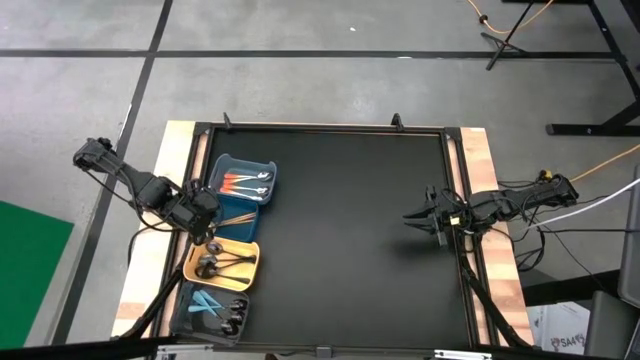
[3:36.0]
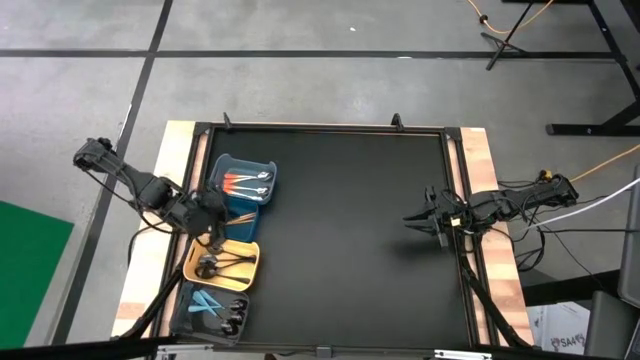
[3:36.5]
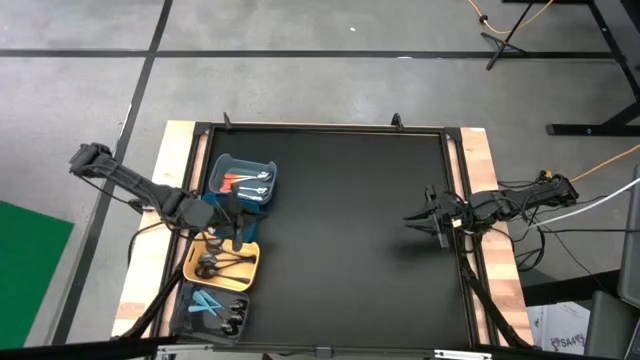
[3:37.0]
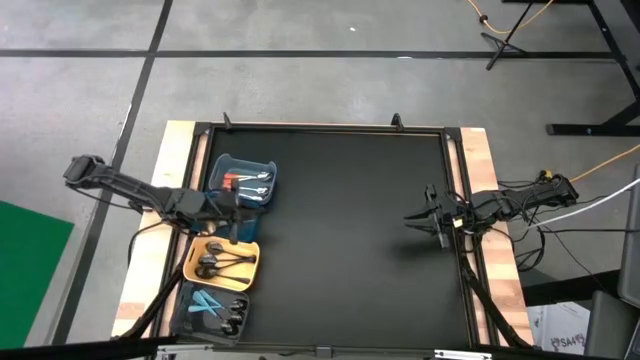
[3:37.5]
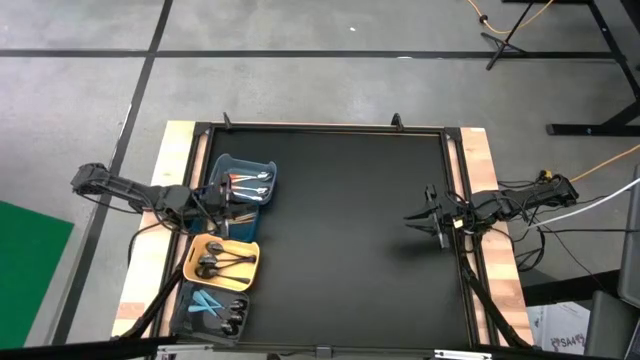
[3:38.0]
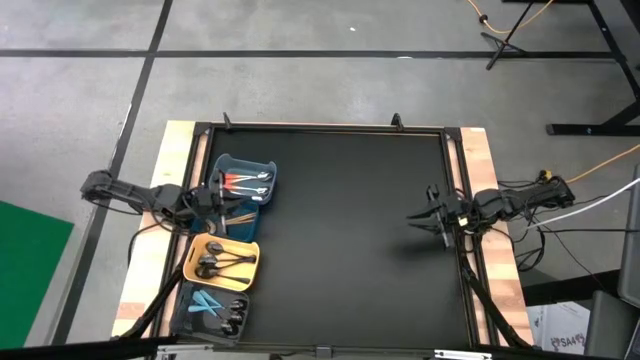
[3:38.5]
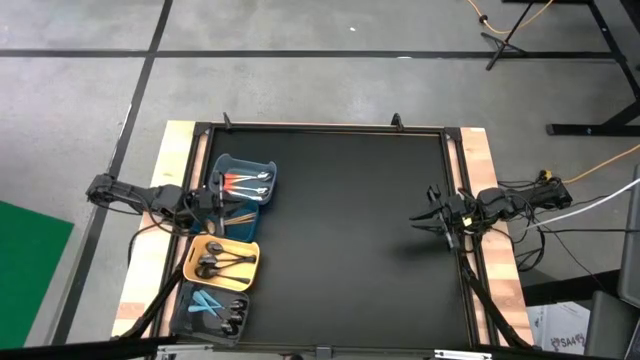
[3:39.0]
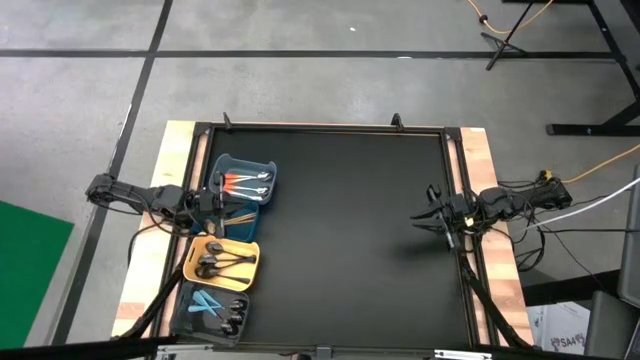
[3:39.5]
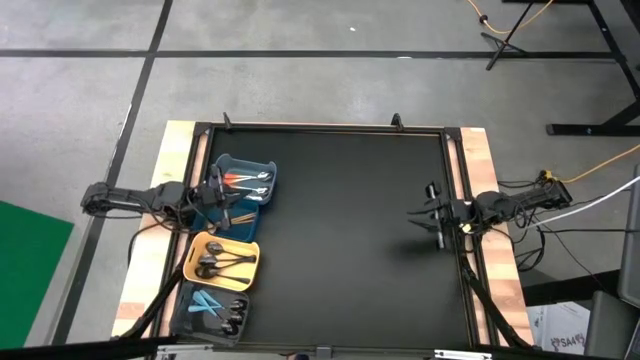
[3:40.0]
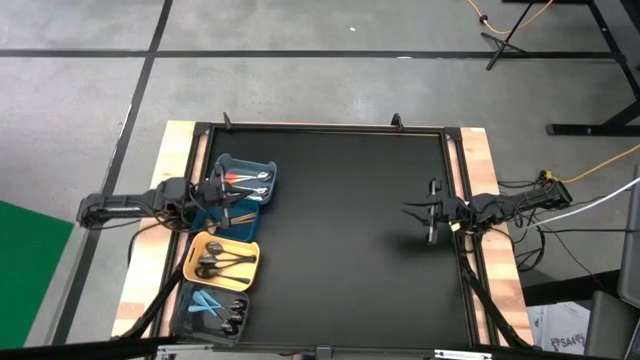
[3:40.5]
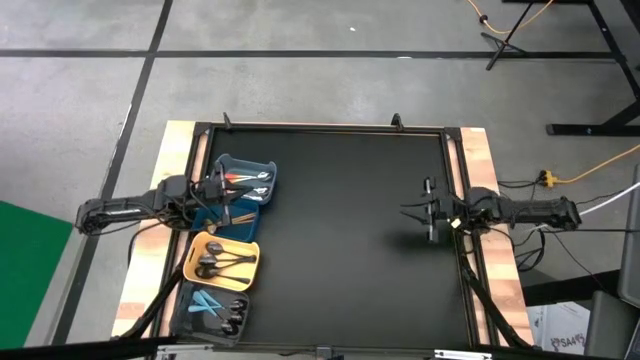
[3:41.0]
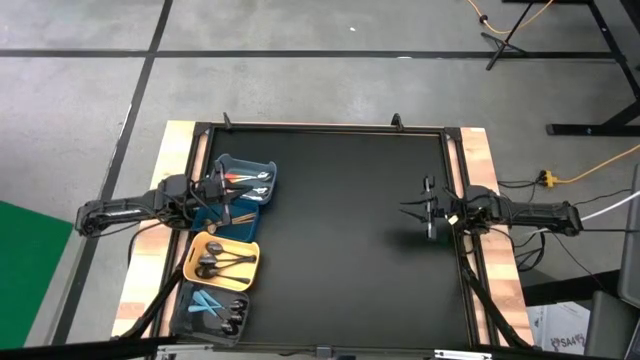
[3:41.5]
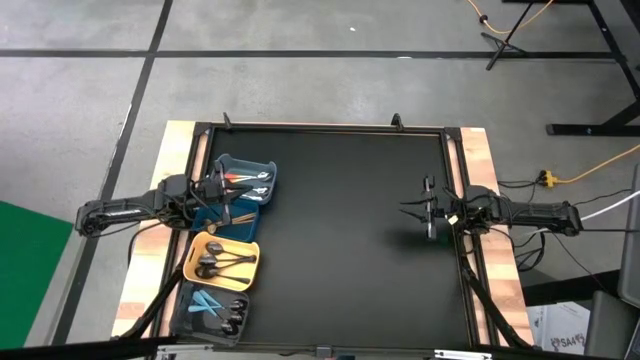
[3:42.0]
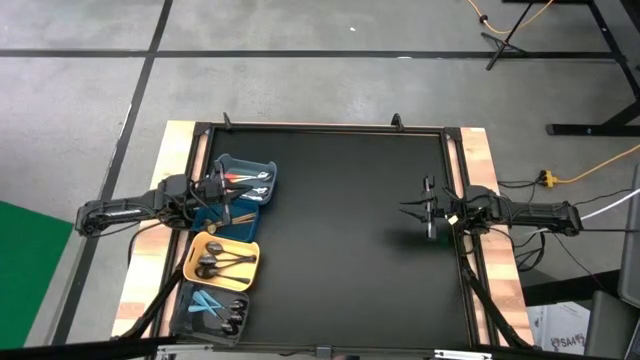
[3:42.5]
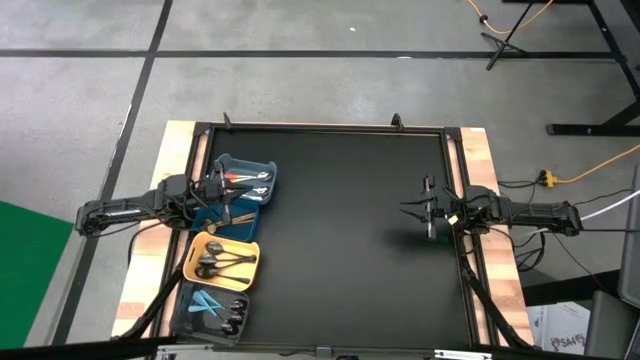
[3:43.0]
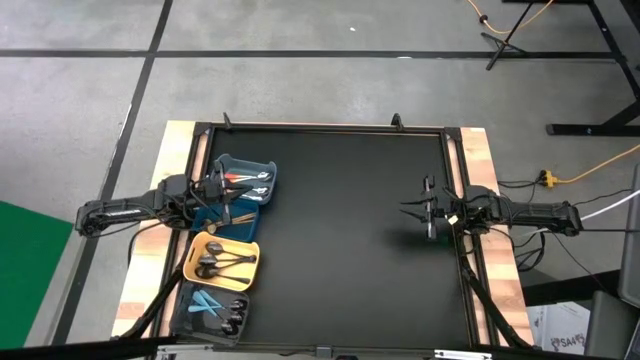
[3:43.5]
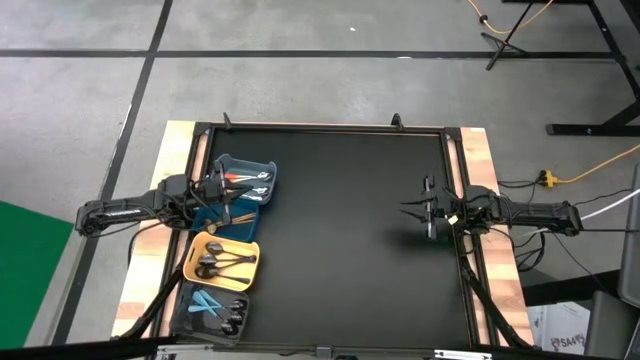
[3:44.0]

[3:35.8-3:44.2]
Task: Sort silverware by color (type)
Return to Home Position

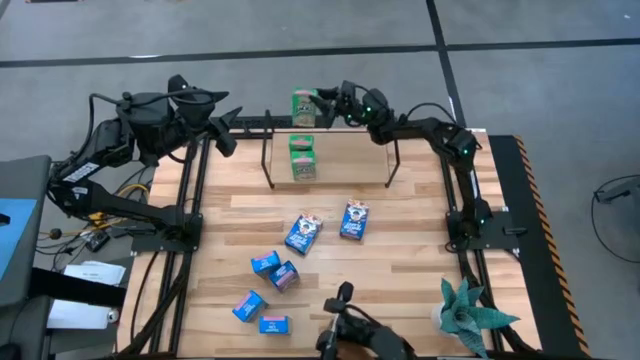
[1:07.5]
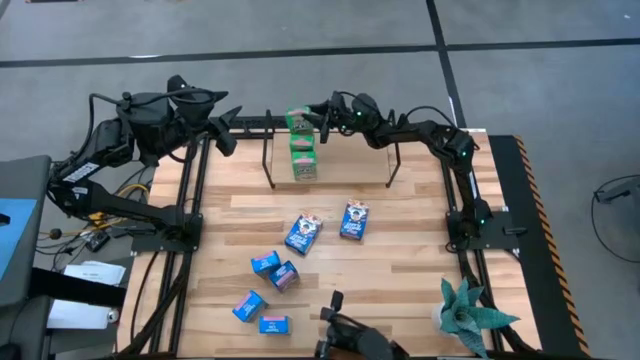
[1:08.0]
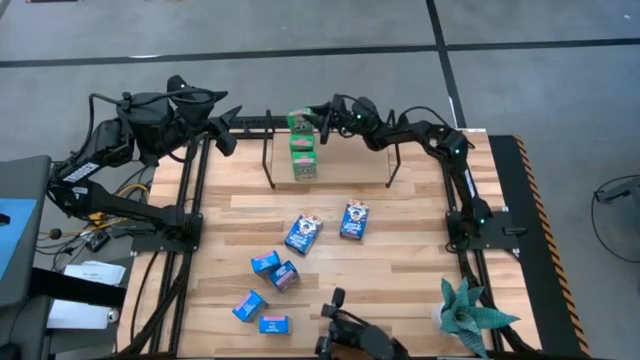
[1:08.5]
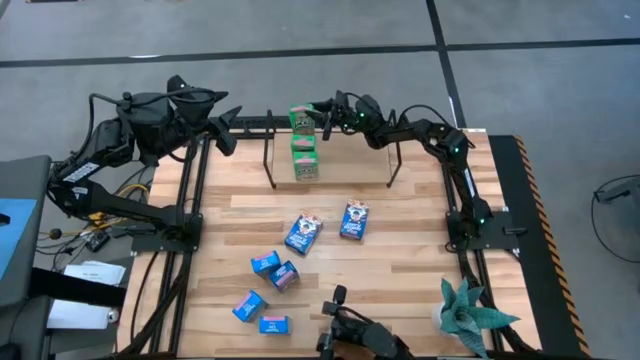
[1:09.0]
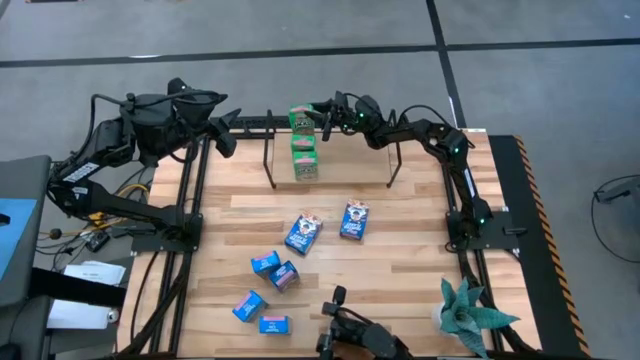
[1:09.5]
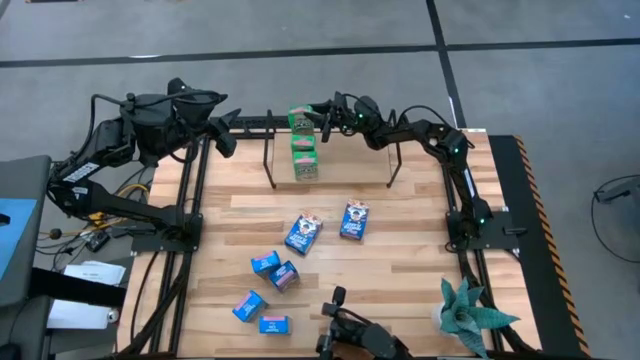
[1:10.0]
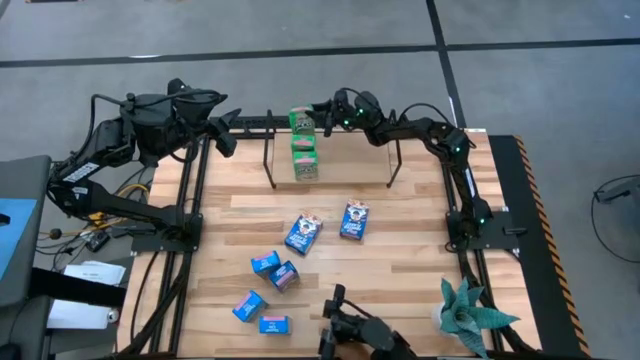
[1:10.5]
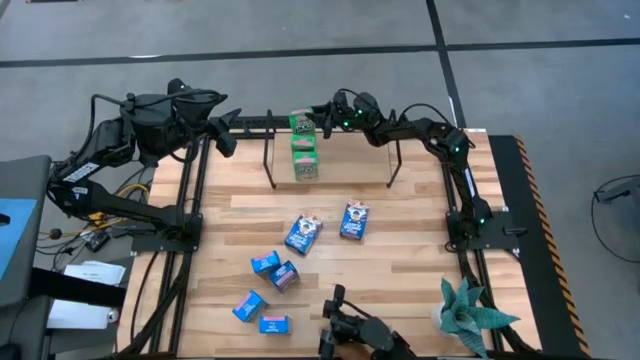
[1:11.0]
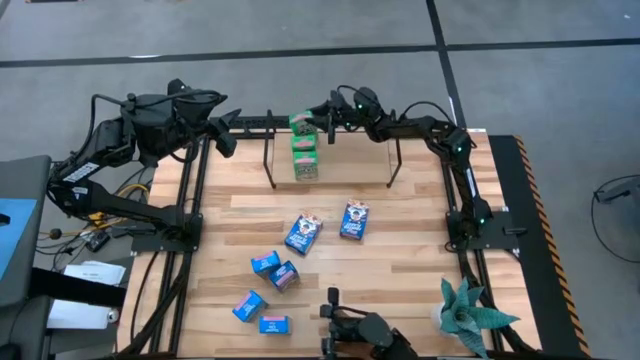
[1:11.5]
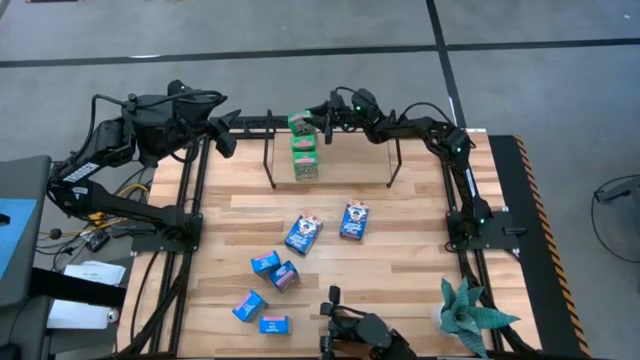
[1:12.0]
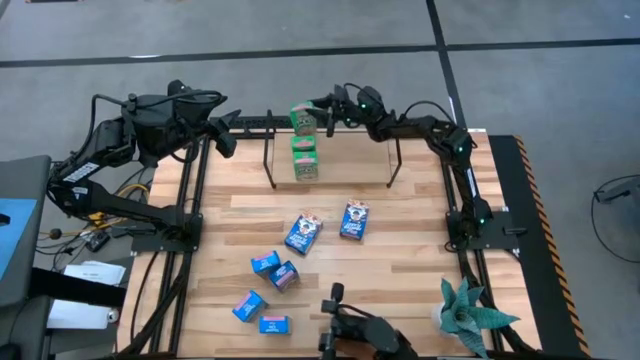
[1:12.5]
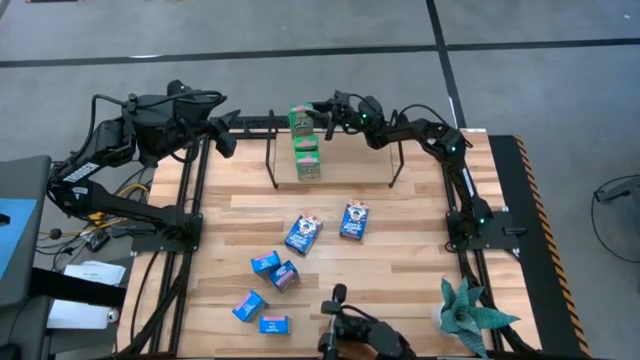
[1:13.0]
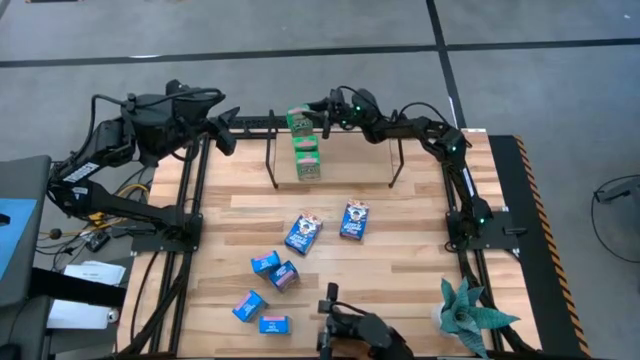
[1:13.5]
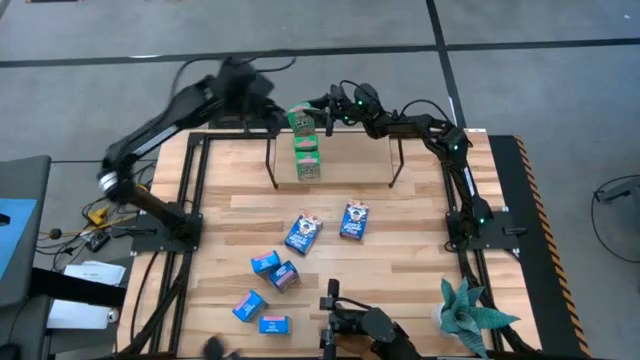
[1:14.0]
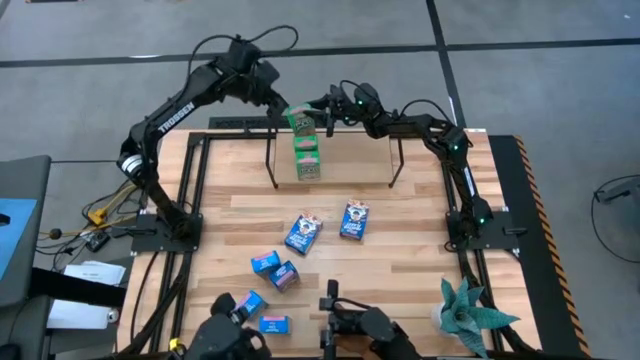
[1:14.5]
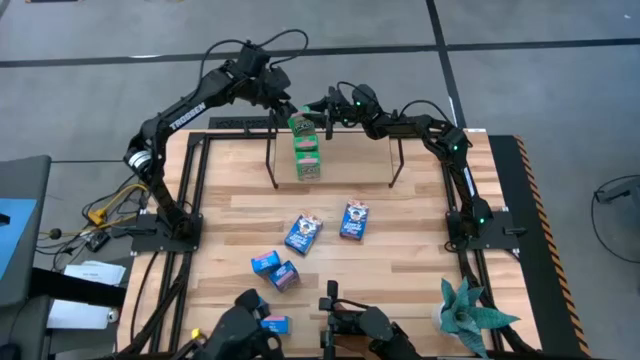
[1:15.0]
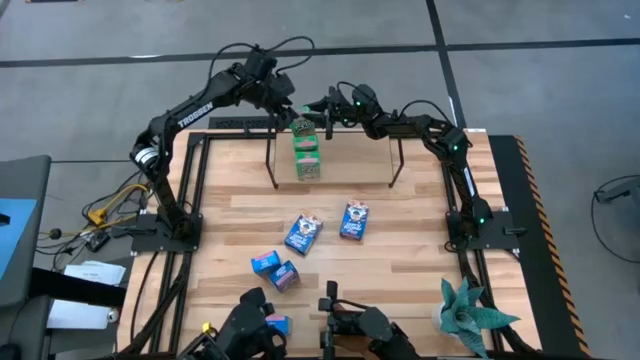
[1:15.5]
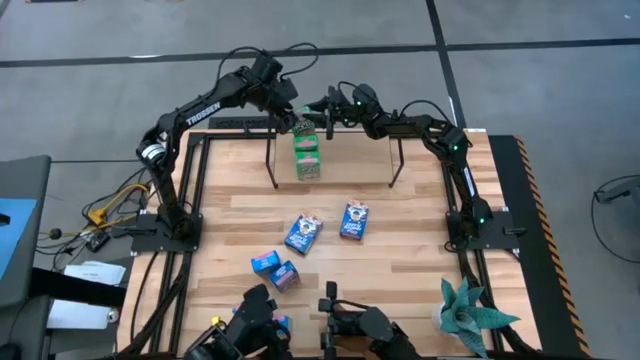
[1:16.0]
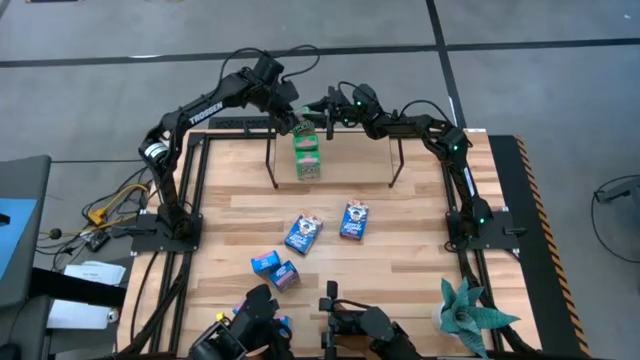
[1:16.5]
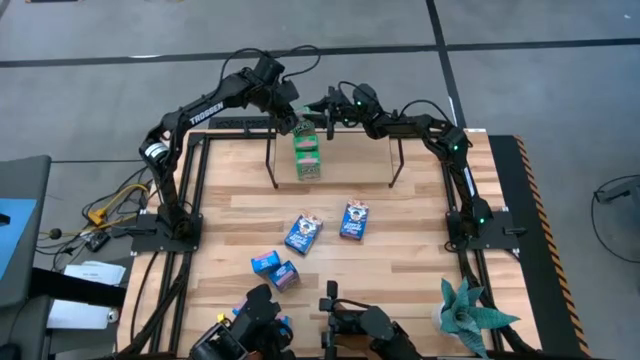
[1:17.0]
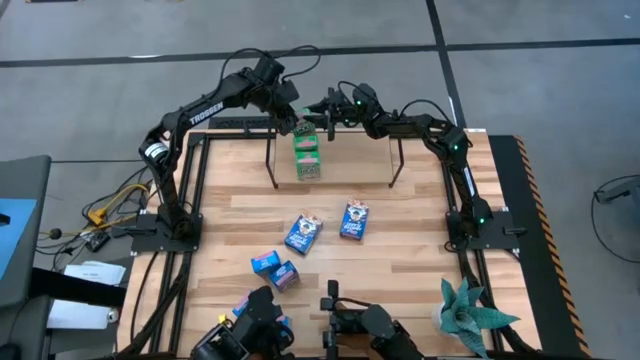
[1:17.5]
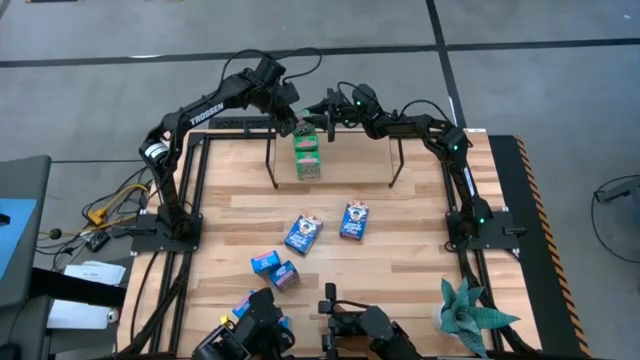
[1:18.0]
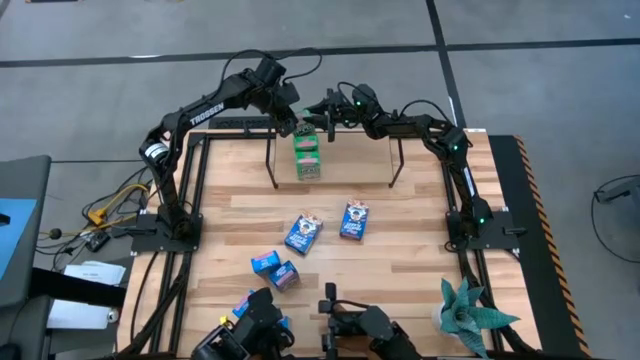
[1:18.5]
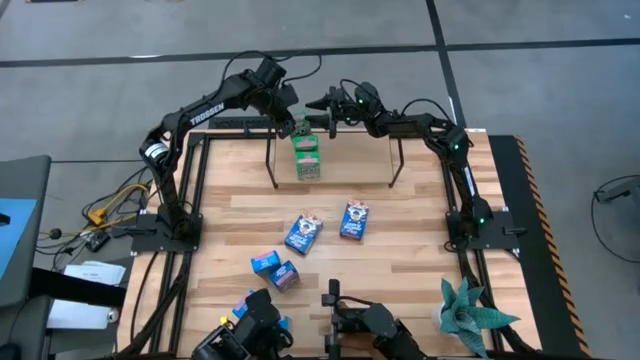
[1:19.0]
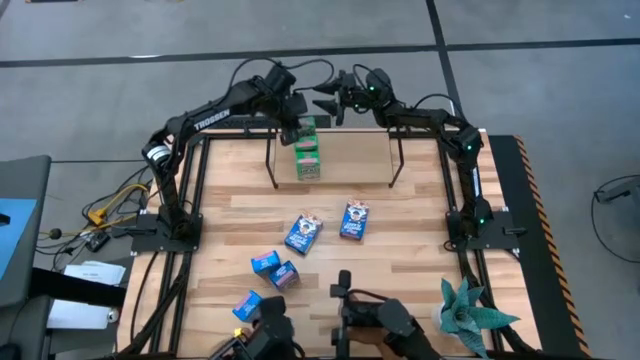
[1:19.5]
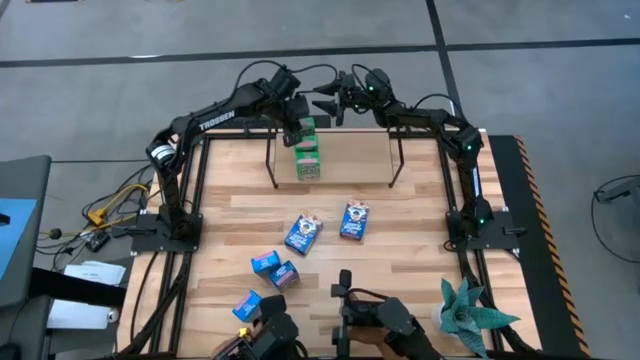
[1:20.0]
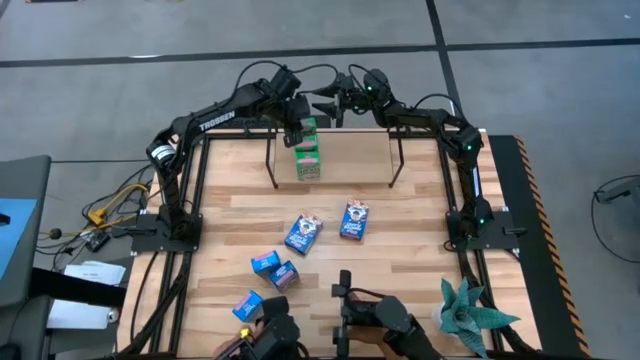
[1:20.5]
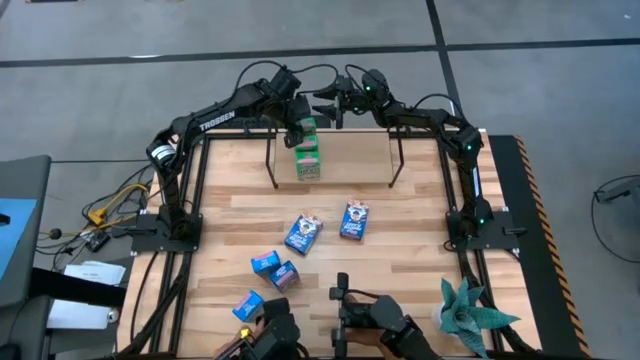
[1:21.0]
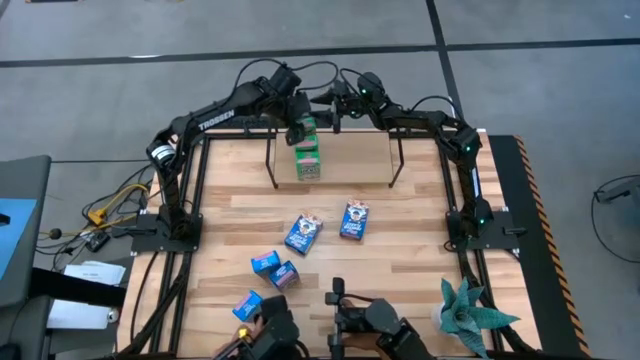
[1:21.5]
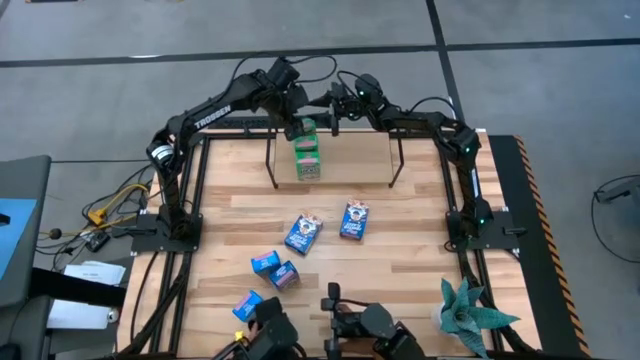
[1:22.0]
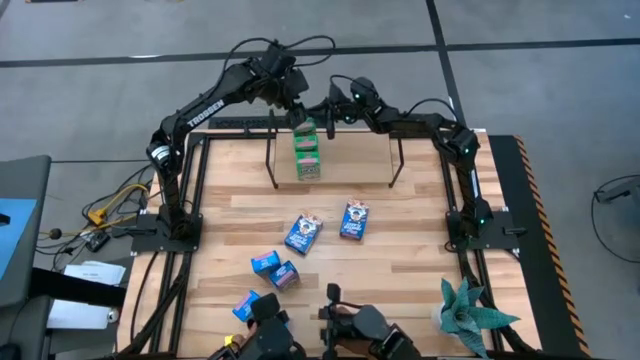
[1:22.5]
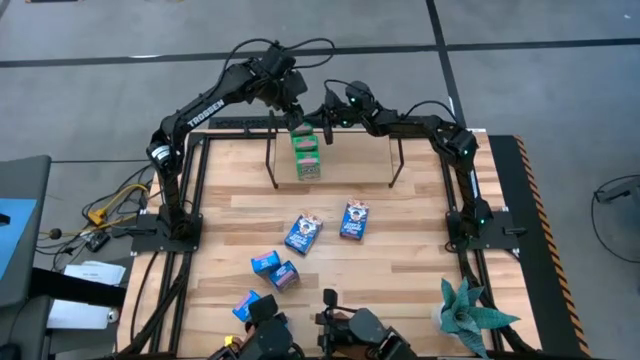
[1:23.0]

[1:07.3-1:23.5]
Task: Stack cereal on shelf
Put the green cereal box on the shelf aligned with the other green cereal box
